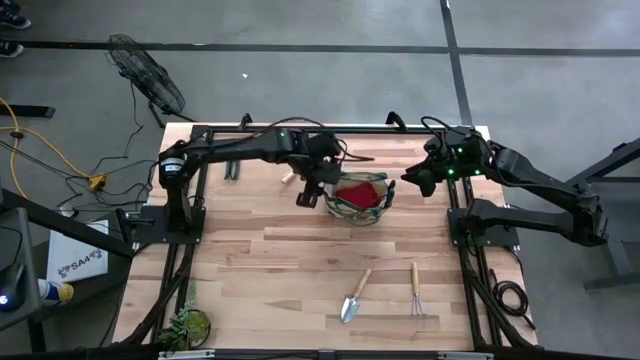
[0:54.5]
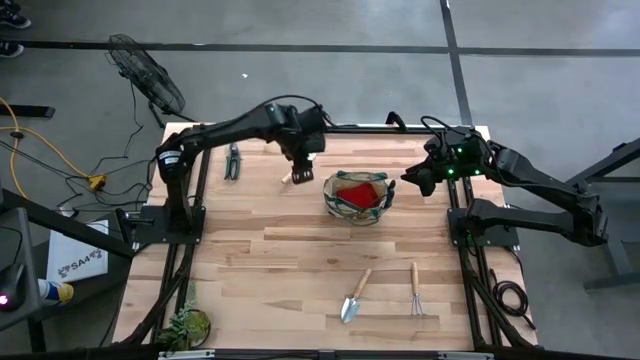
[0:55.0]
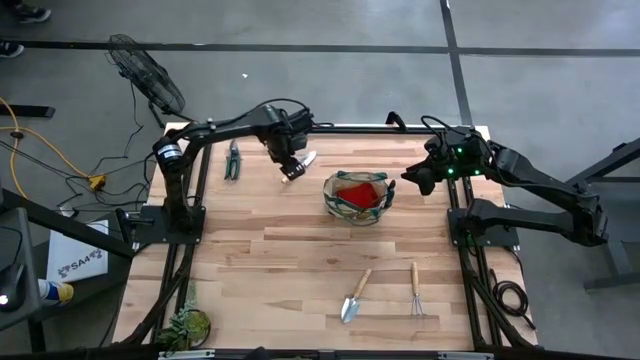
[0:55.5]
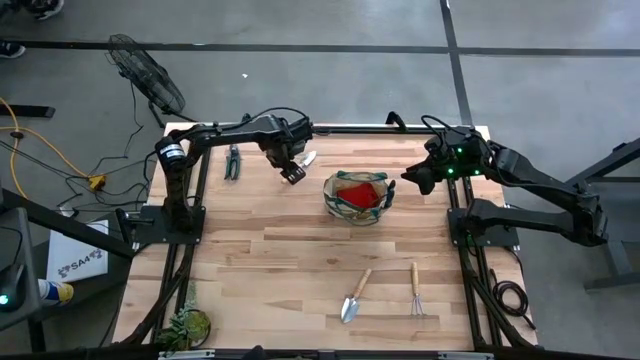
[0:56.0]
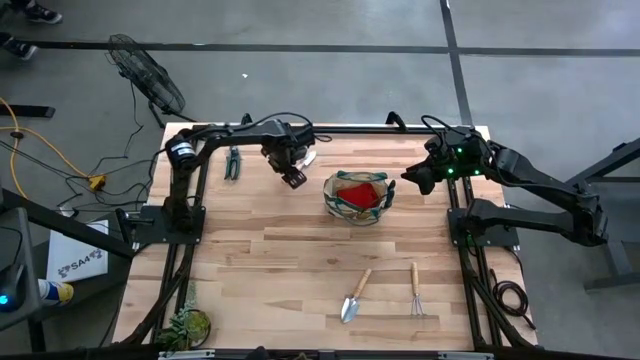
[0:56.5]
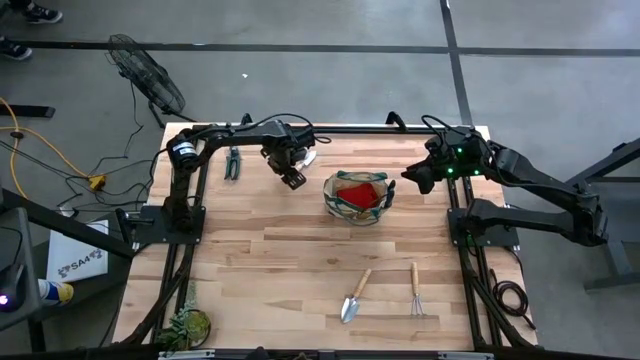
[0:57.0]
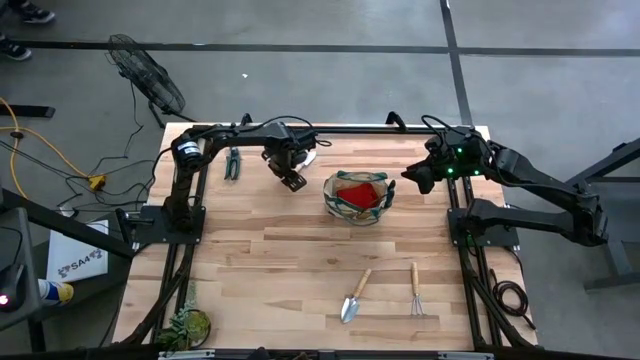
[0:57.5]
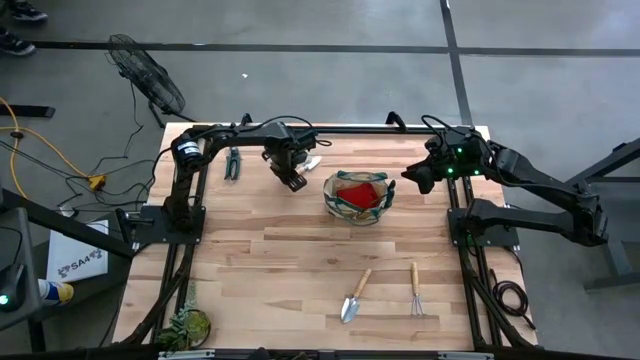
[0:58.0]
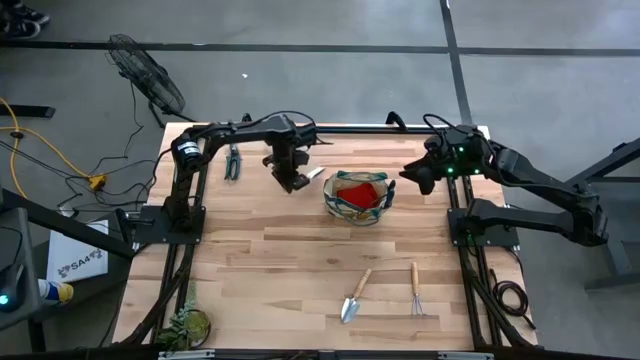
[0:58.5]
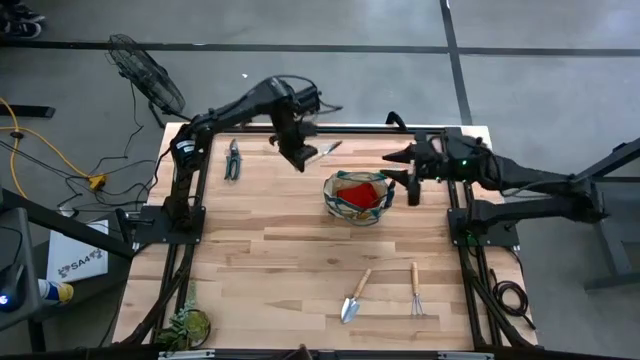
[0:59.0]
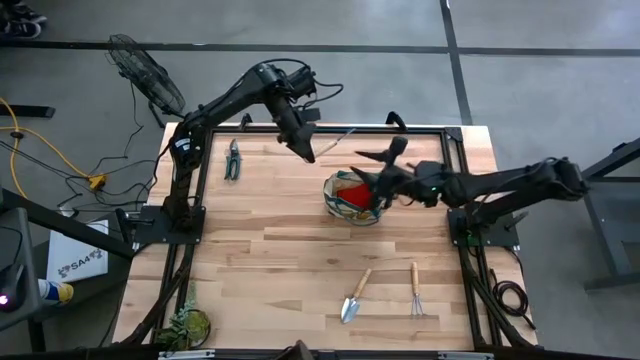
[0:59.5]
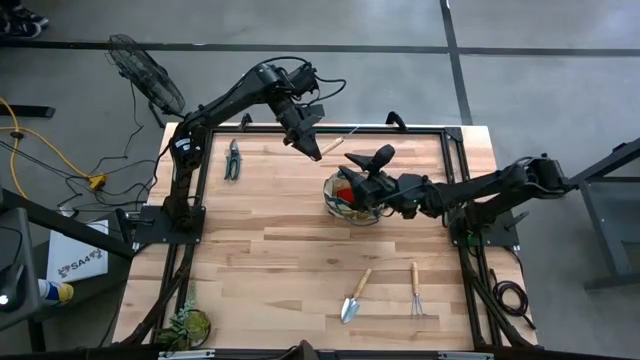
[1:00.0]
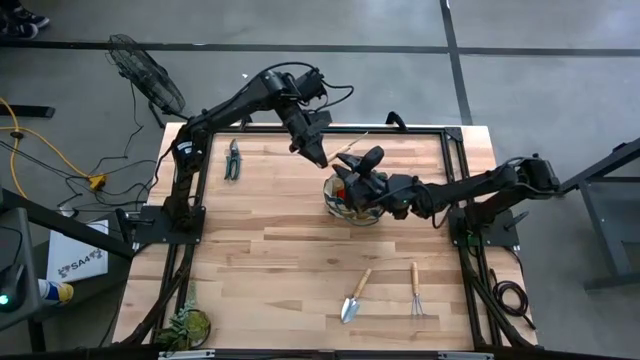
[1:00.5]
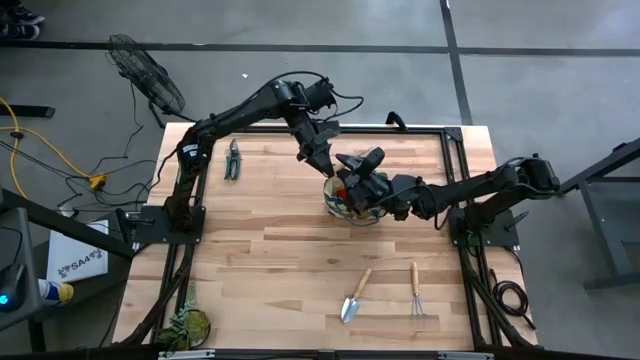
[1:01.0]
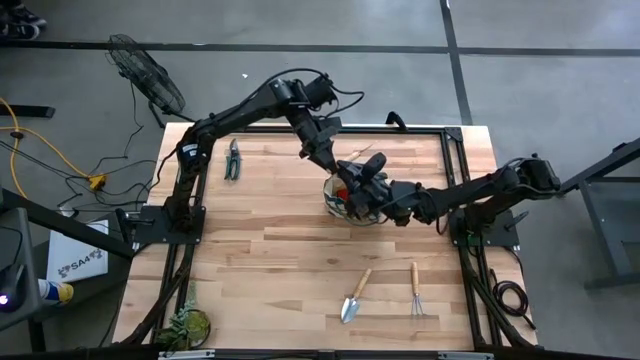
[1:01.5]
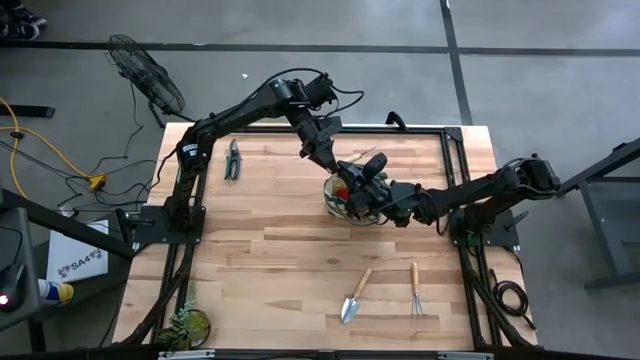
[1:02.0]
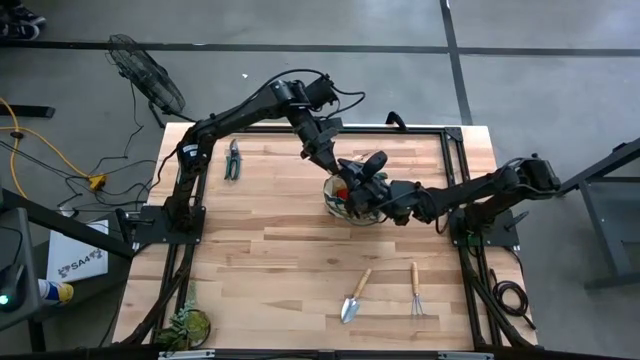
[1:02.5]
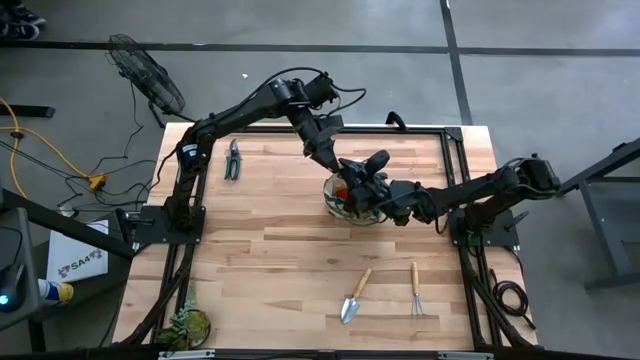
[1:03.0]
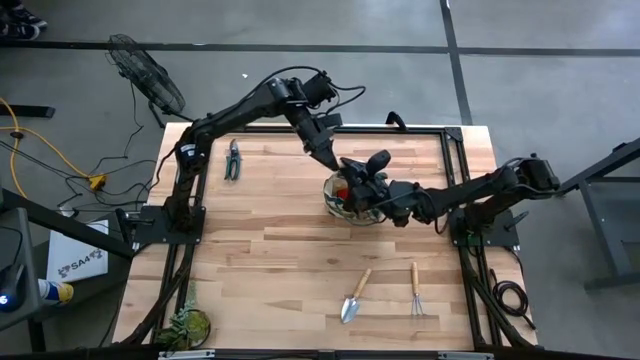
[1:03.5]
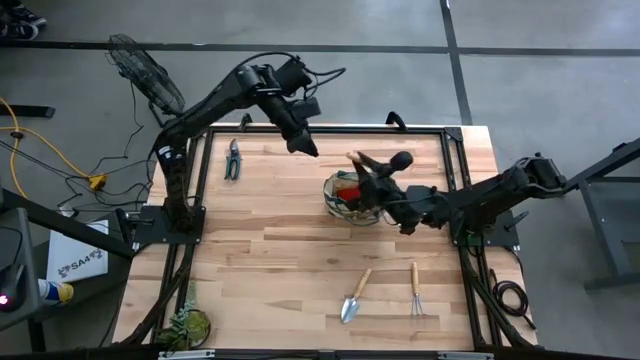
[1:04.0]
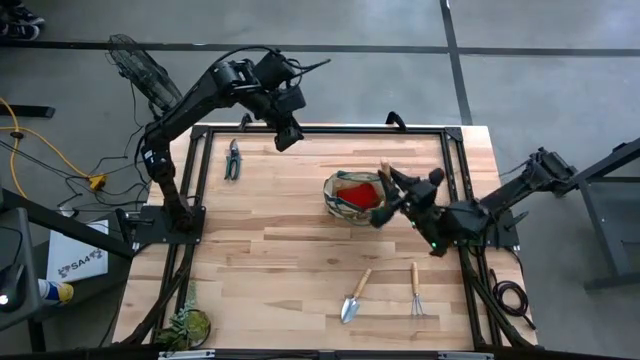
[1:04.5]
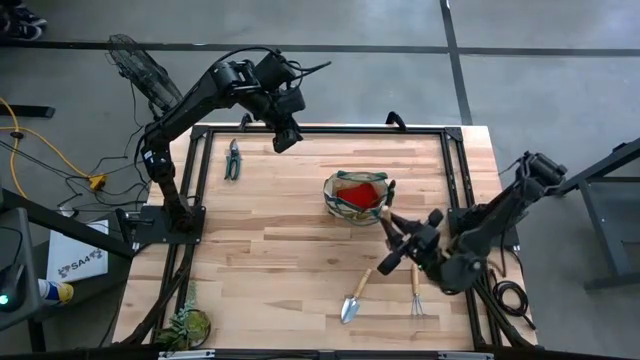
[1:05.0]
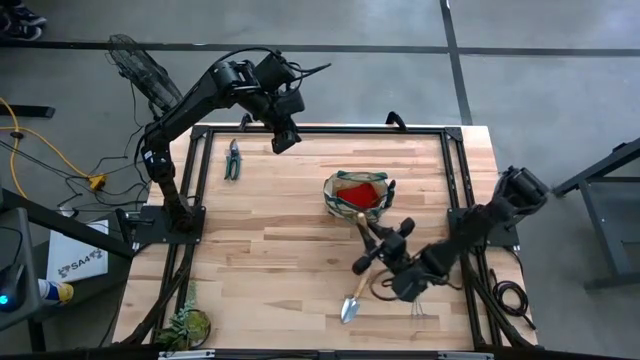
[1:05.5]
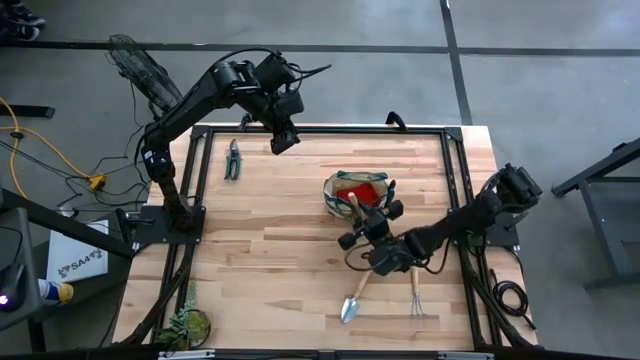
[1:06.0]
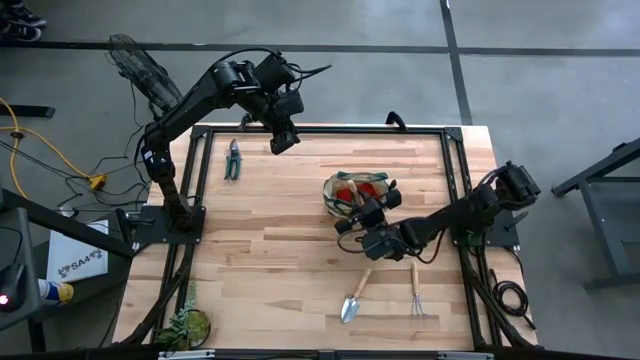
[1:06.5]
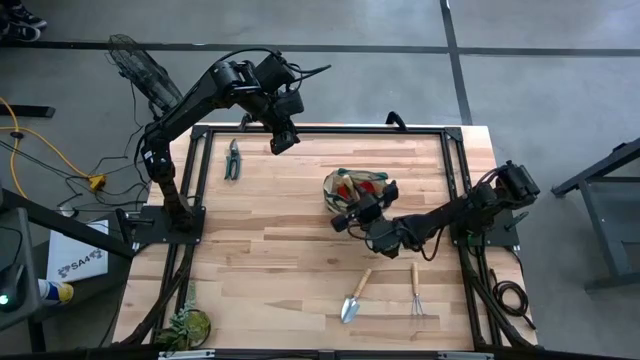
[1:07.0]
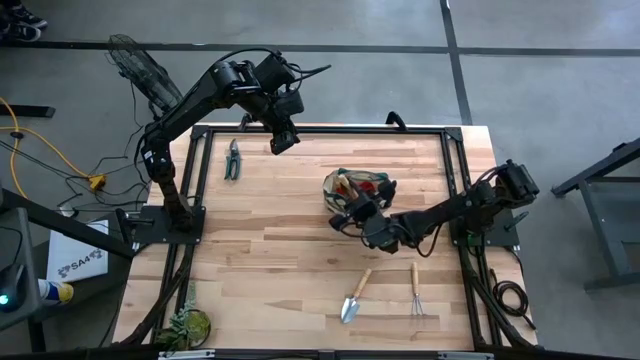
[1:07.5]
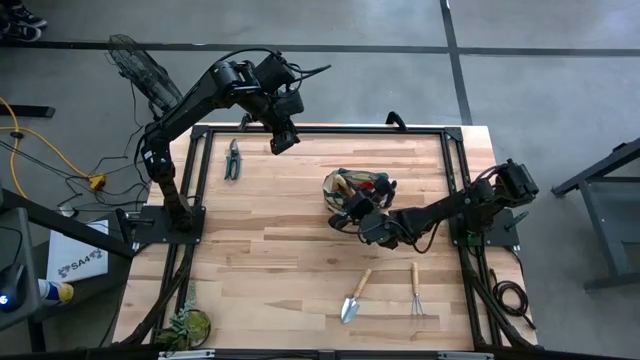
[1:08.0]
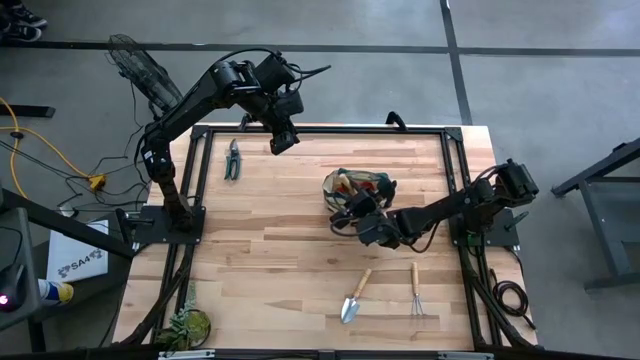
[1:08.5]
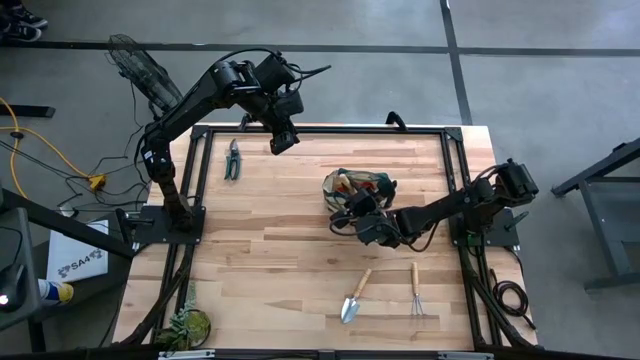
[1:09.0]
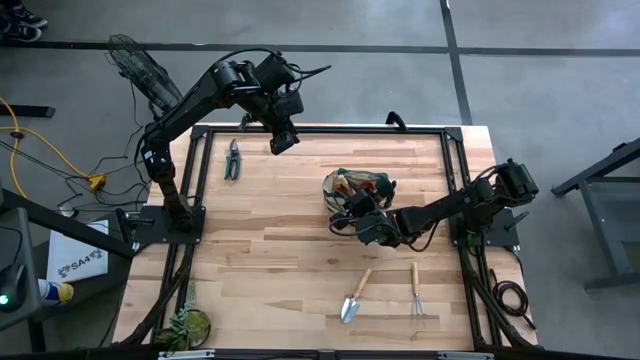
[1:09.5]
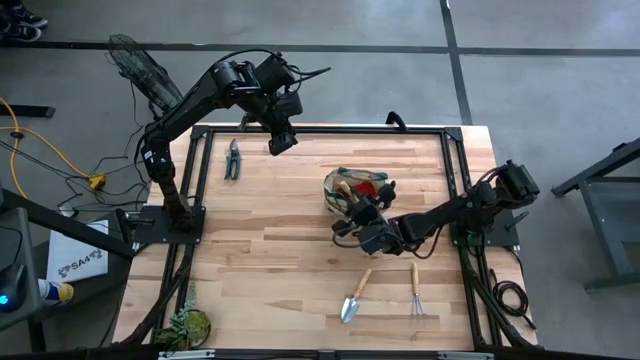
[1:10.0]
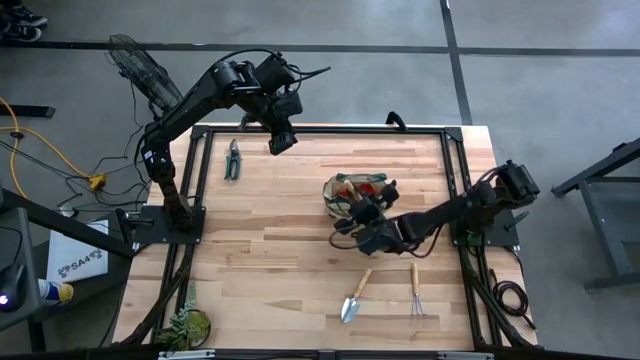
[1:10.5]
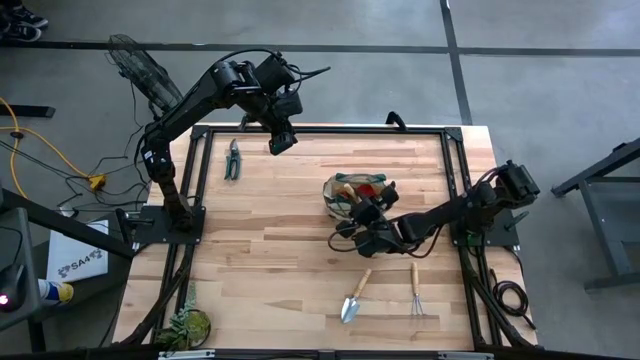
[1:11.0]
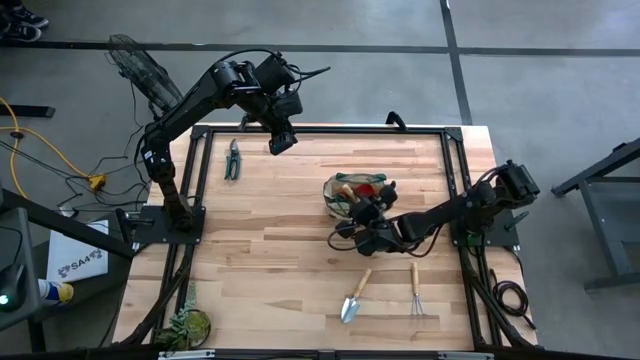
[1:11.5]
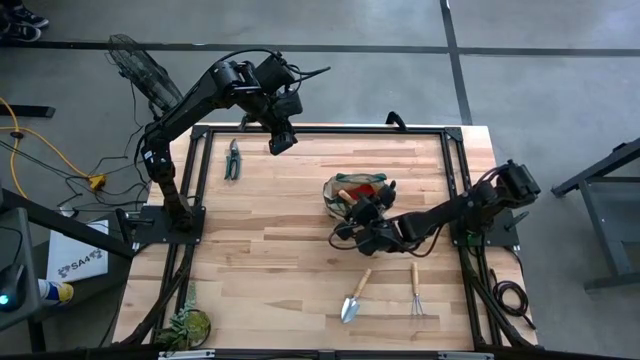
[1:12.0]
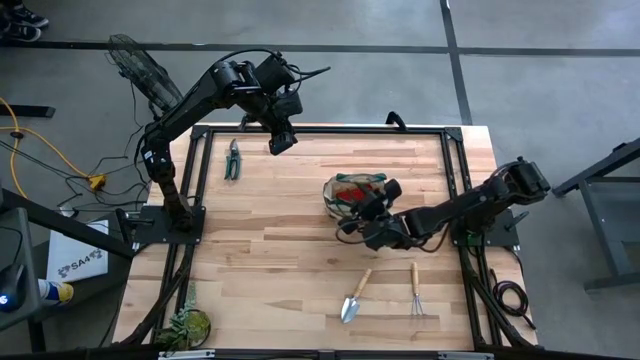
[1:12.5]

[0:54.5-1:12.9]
Task: Pick & Place Garden tools in Gardening bag
Put the top trowel into the gardening bag

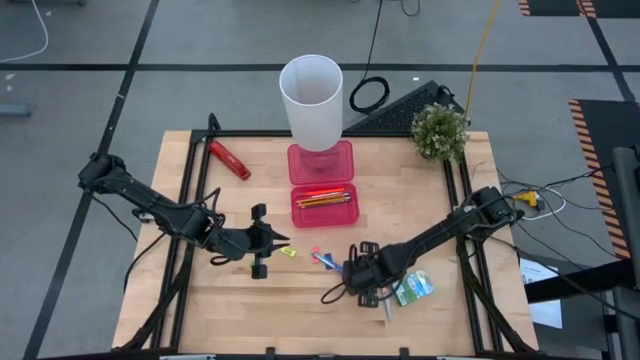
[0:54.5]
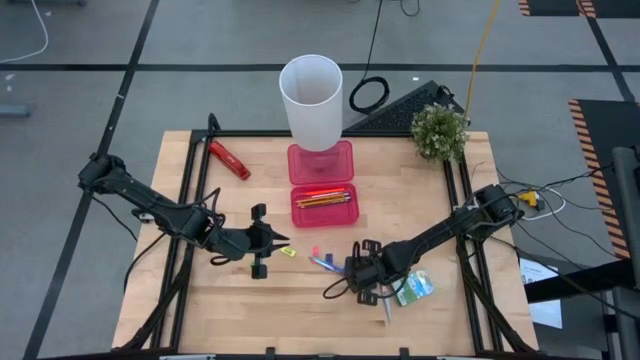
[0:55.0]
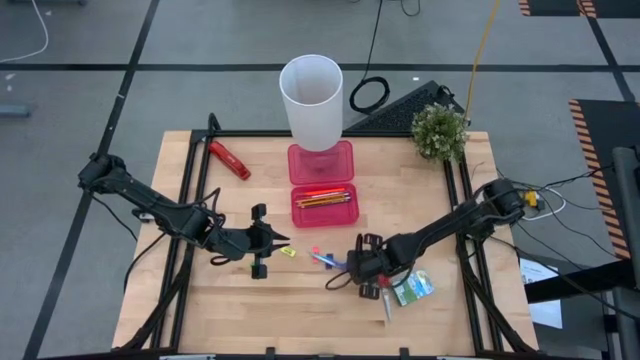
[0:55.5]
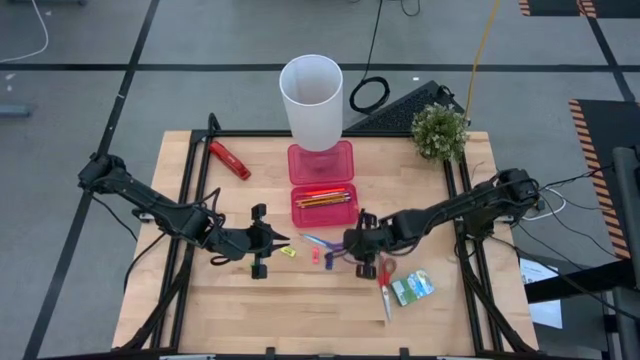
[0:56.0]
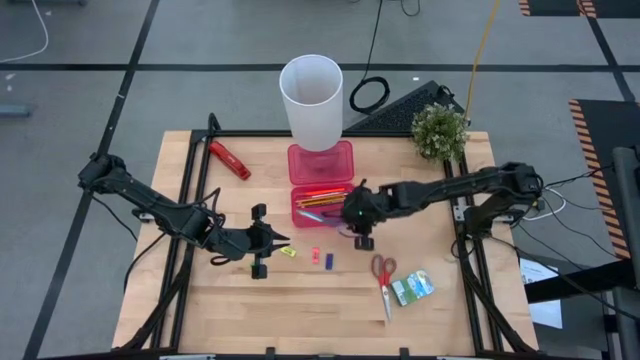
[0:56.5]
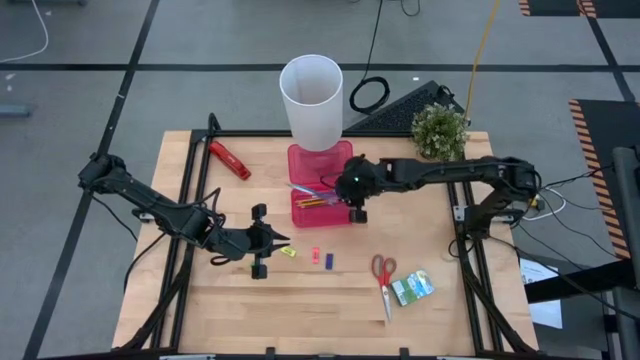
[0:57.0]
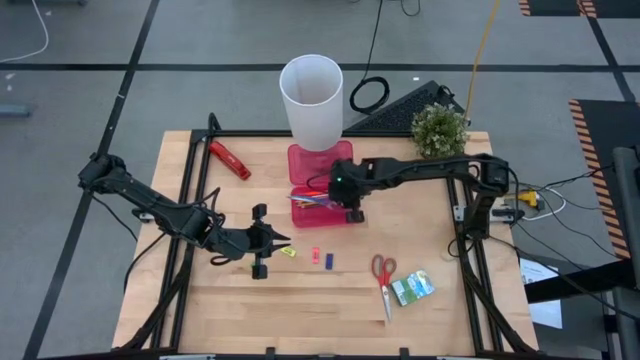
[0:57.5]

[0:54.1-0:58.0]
Task: Pack school essentials
Put the purple scissors into the pink supply box
